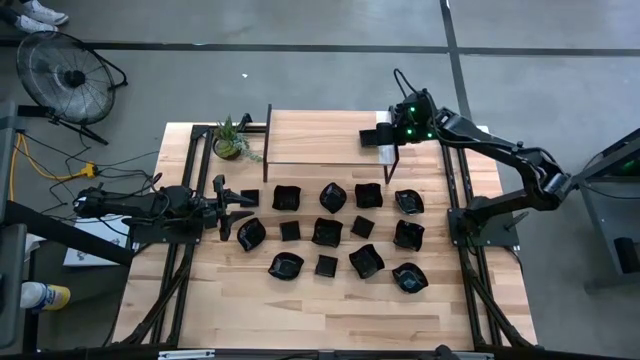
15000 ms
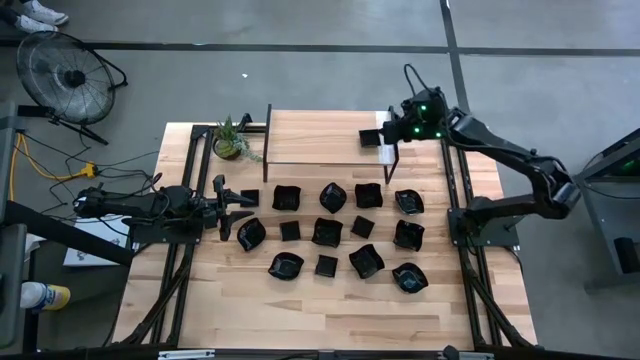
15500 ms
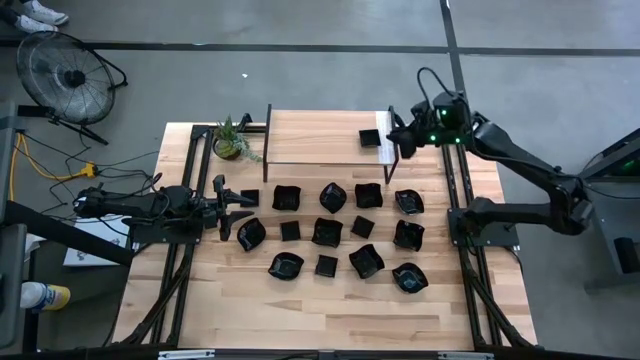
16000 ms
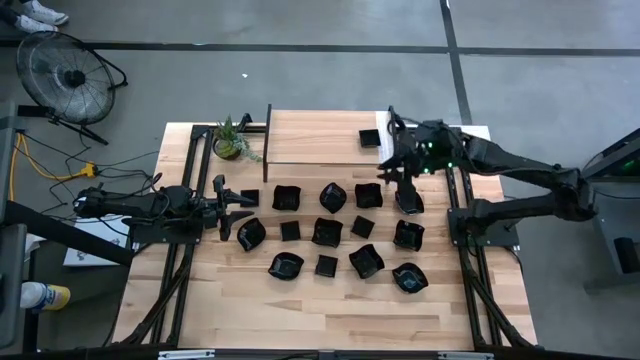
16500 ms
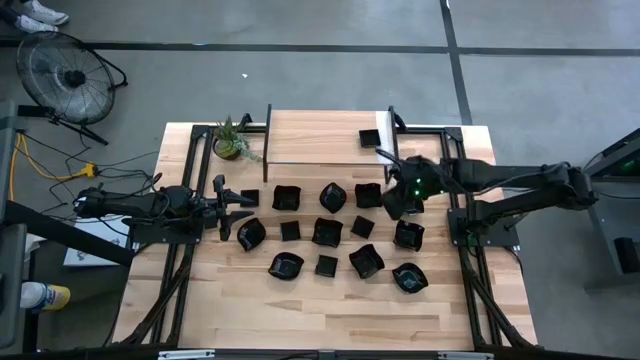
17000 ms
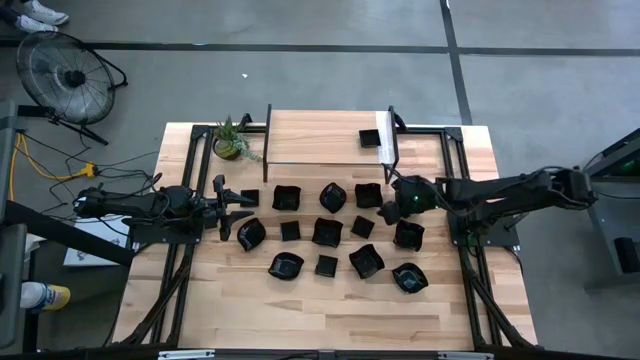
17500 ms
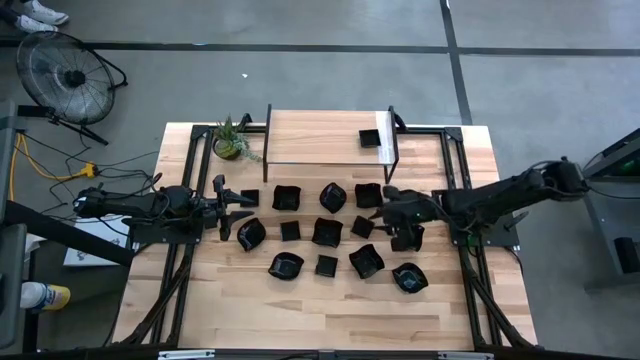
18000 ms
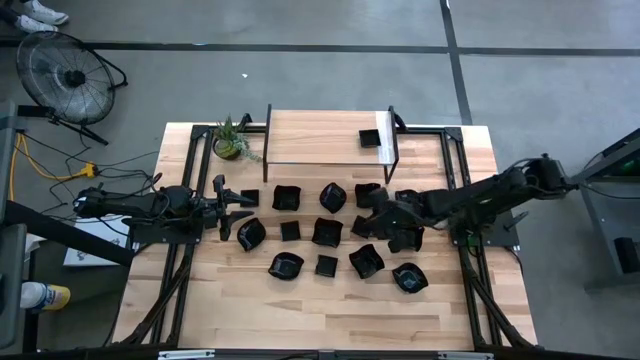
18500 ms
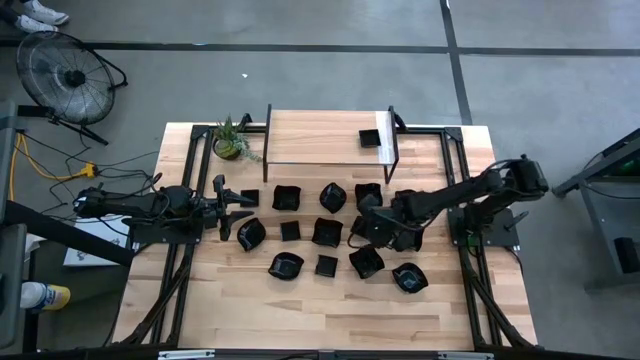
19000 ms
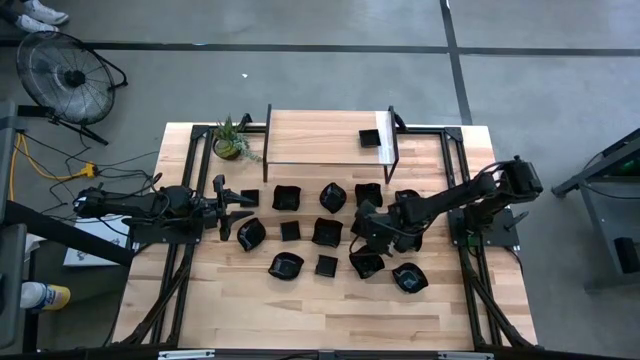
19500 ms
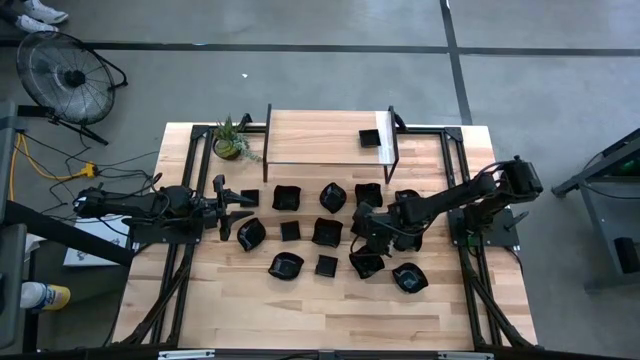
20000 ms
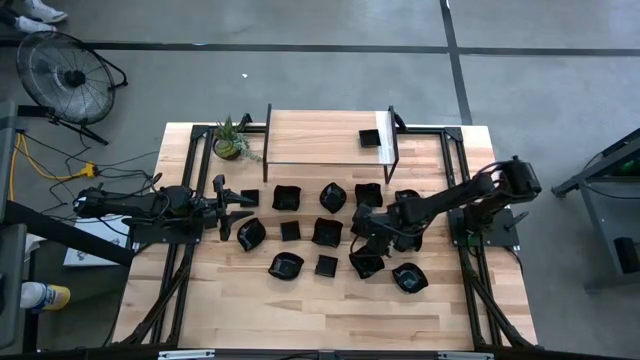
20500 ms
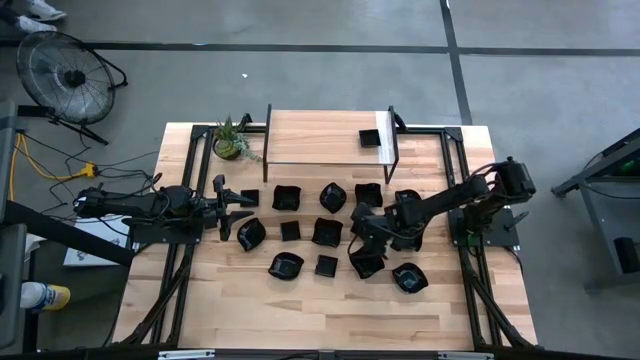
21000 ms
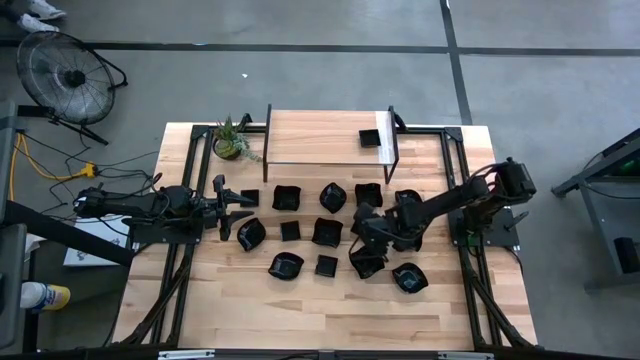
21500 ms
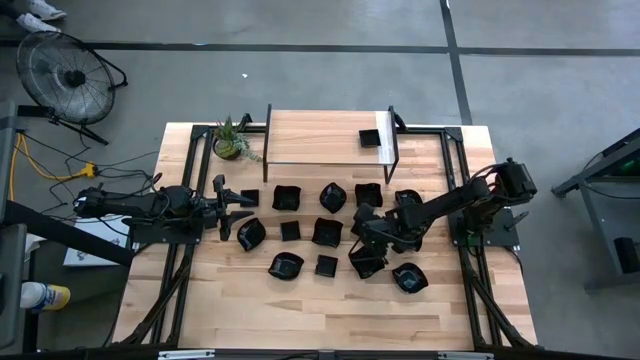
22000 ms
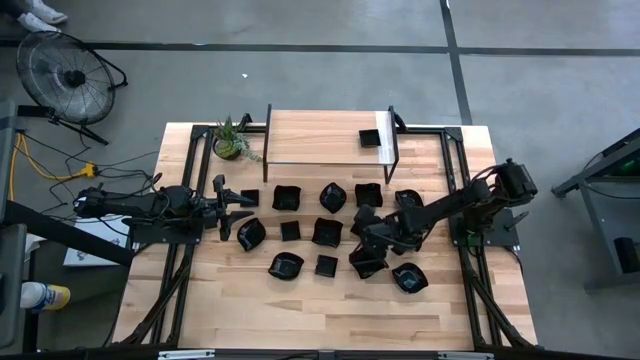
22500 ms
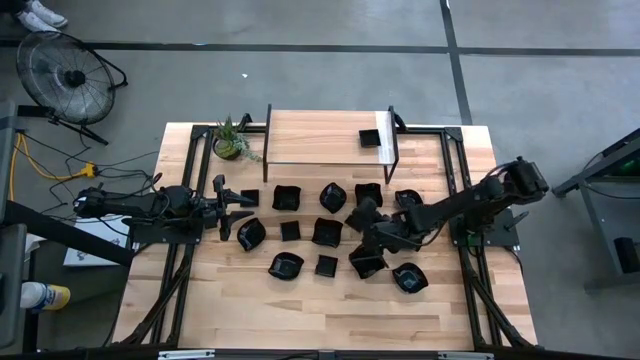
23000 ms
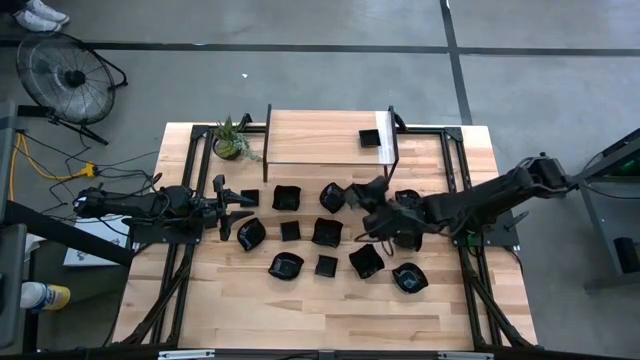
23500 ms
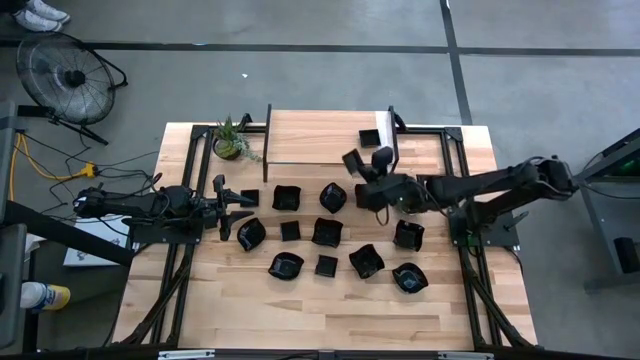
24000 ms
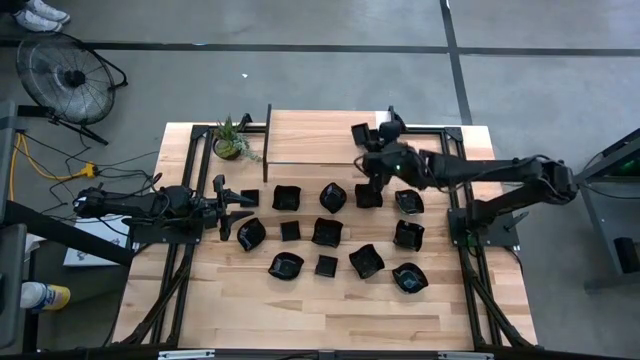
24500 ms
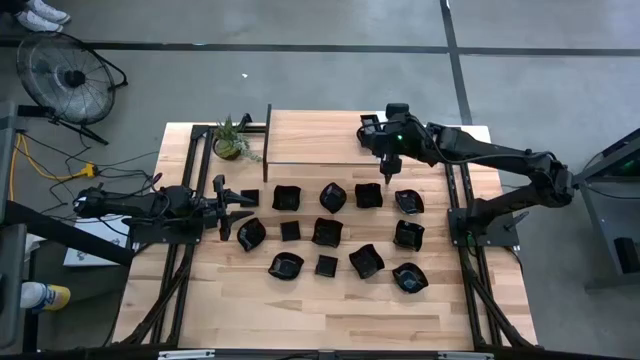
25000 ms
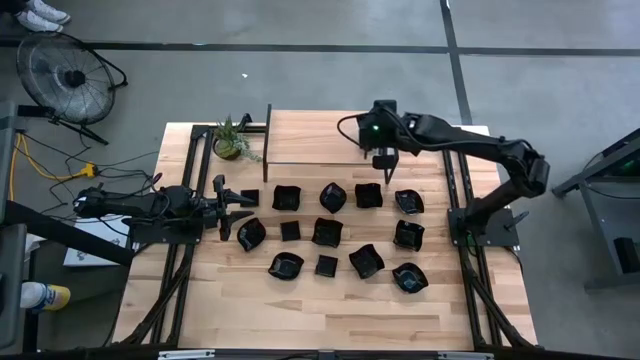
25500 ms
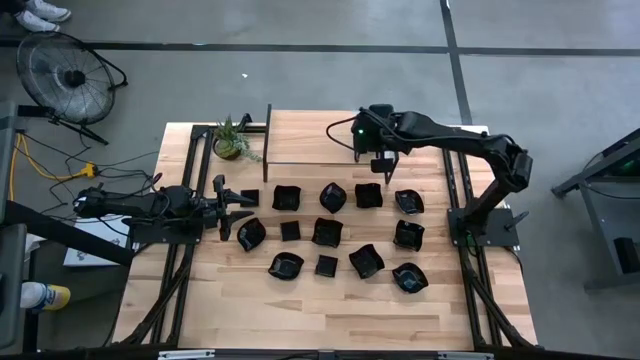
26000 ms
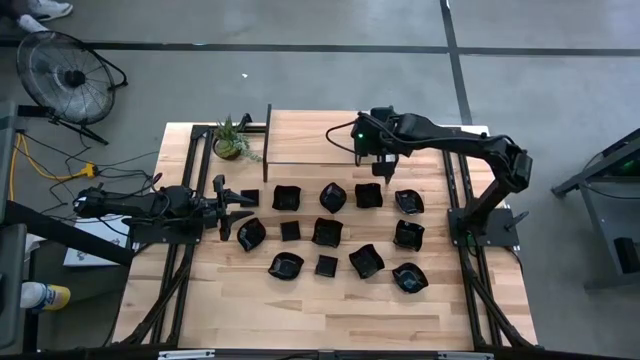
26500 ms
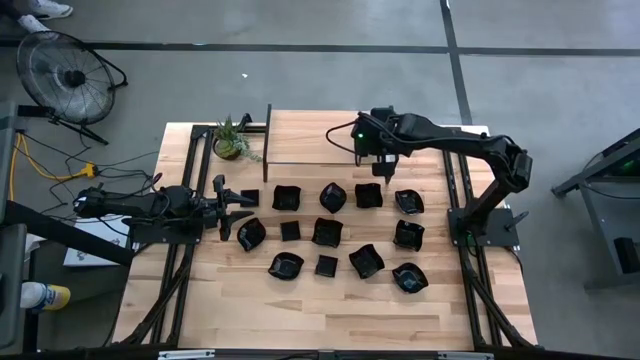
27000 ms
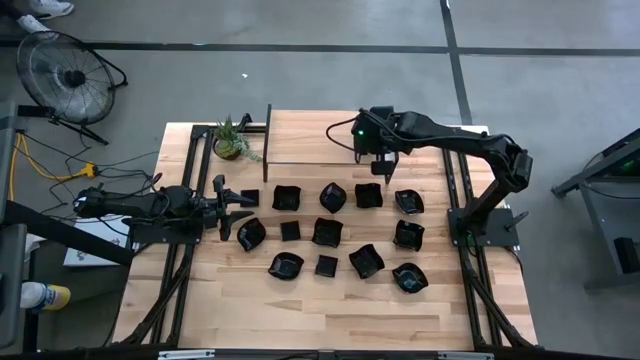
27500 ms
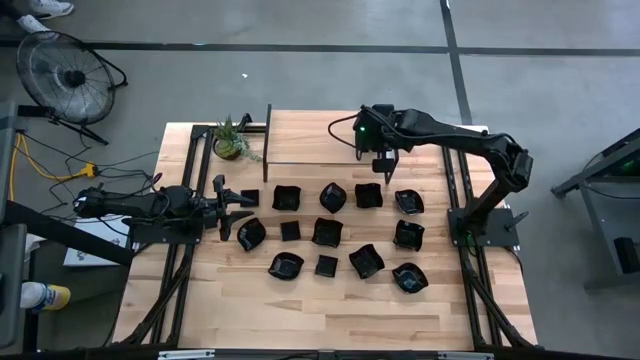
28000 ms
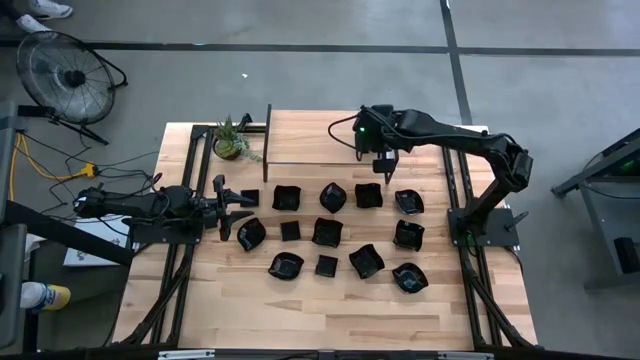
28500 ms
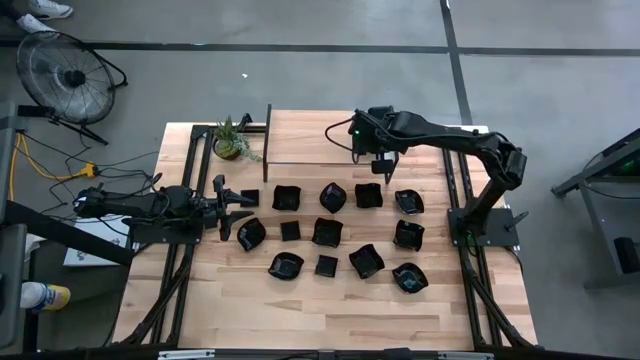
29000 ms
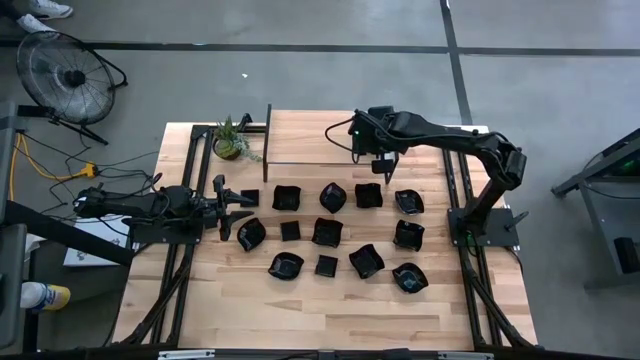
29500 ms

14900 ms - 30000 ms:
Task: Pick & Place Mini shaped plates
Stack the black square plate on top of the black square plate on the shelf

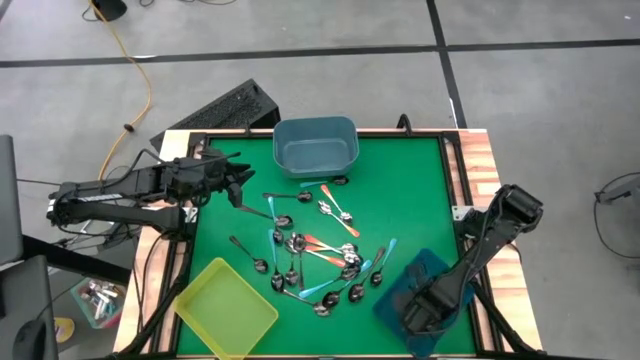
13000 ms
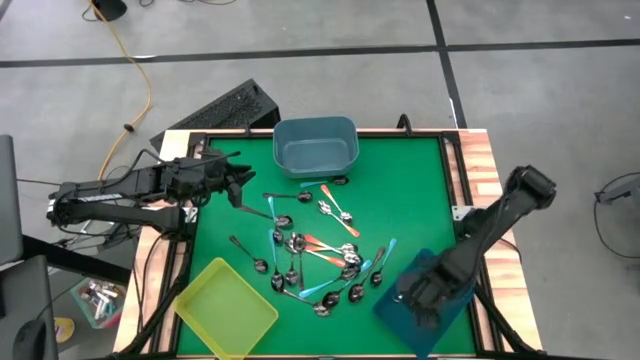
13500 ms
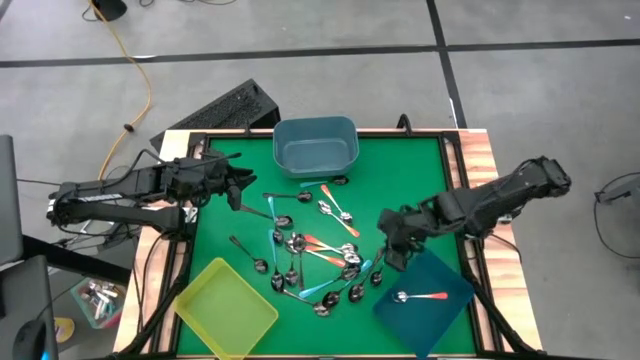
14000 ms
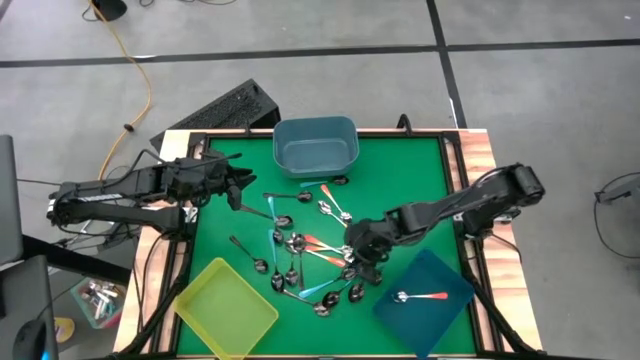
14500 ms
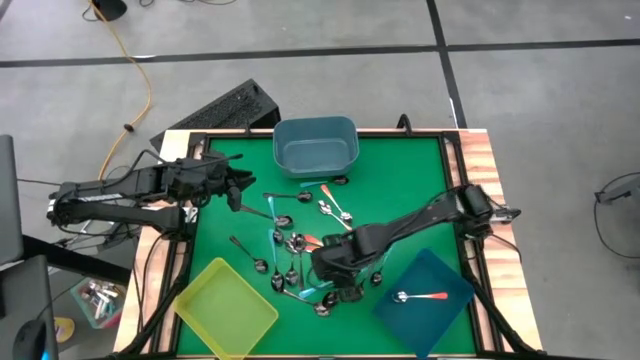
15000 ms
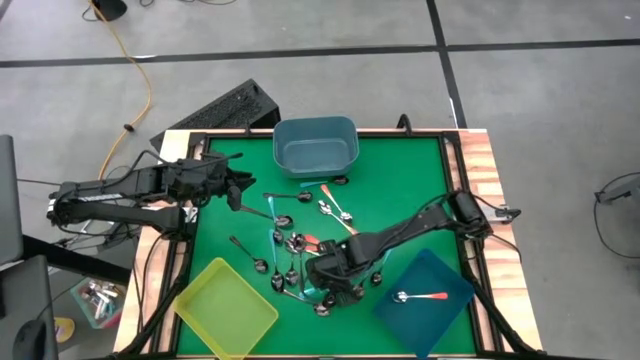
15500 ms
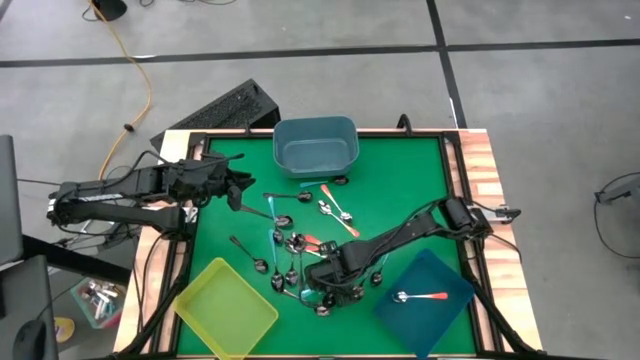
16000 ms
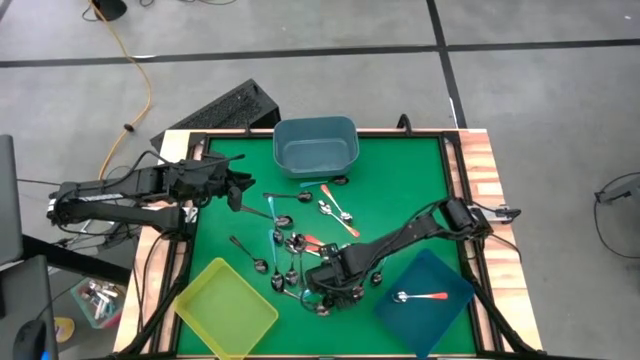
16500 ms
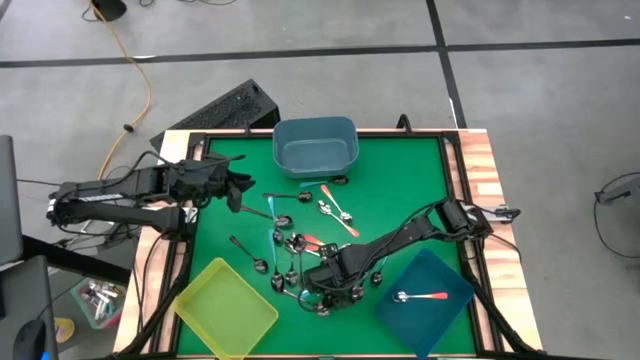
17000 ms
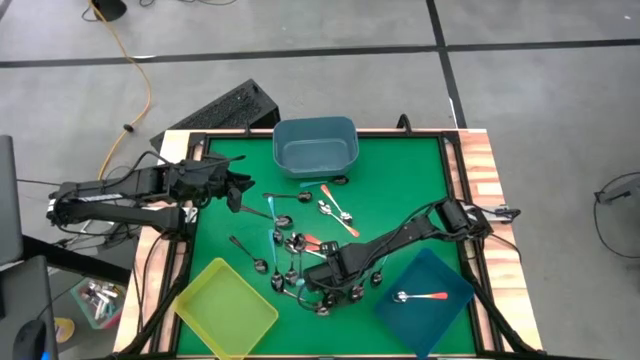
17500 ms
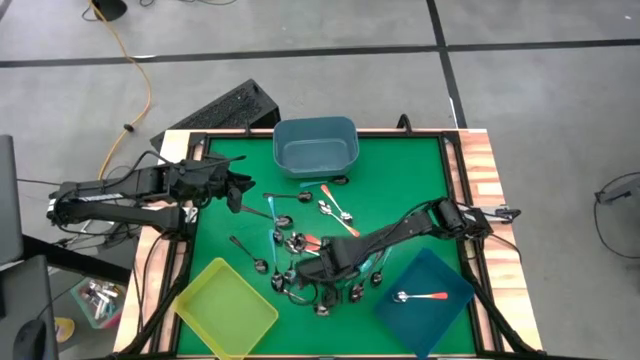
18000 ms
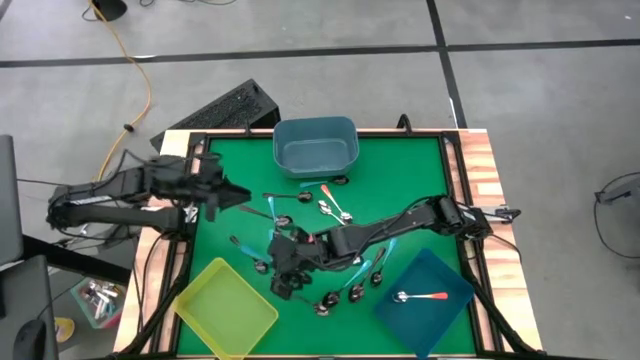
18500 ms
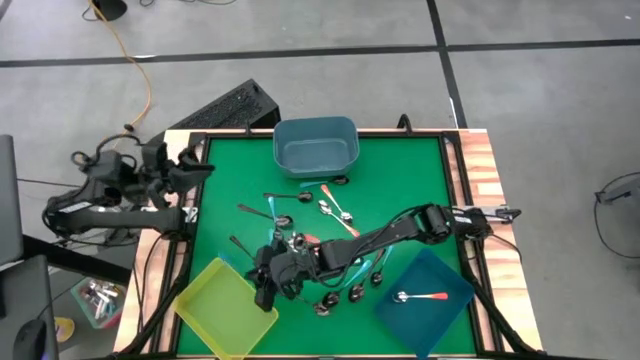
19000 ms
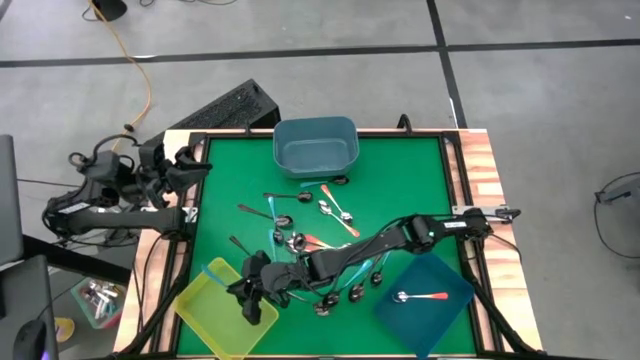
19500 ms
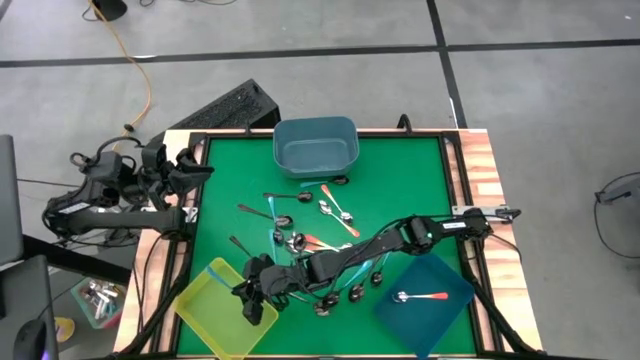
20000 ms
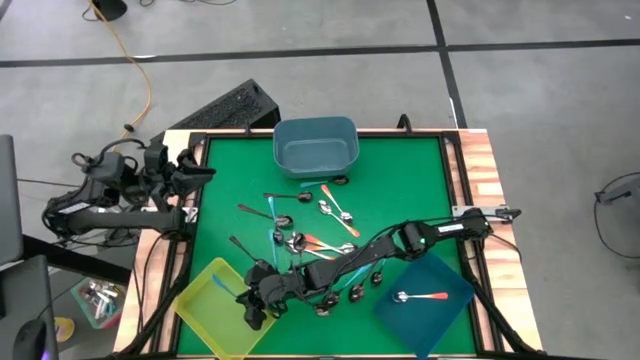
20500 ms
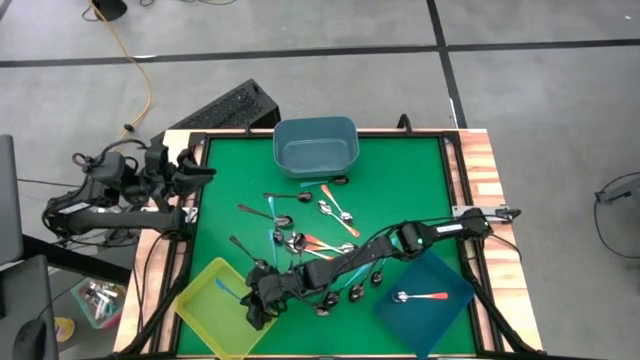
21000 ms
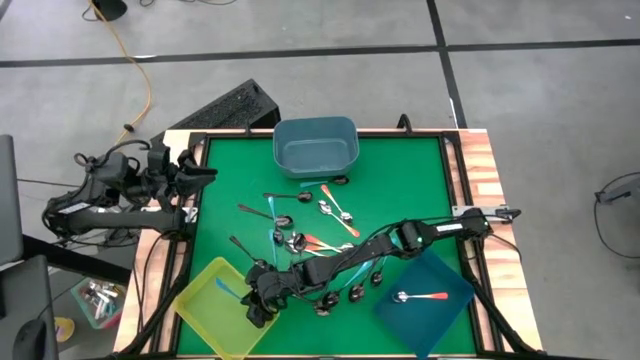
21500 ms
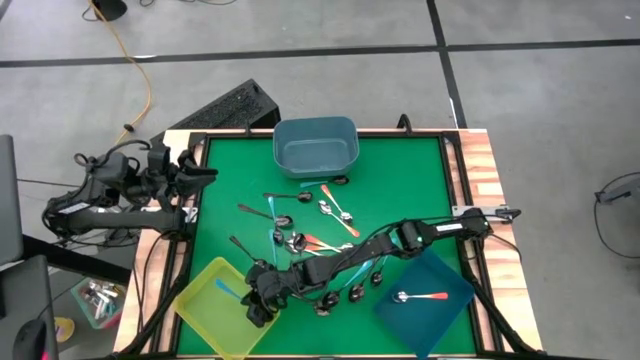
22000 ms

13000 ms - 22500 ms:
Task: Sort silverware by color (type)
Put the light blue spoon into the yellow bin
